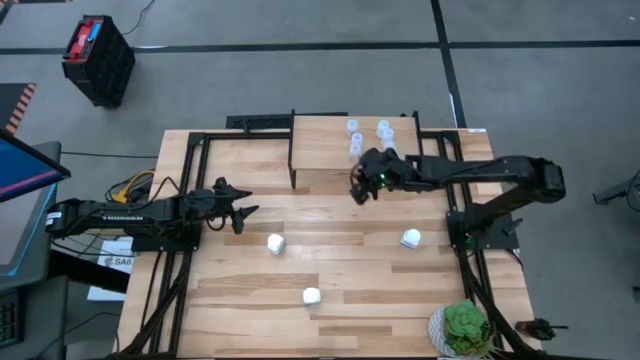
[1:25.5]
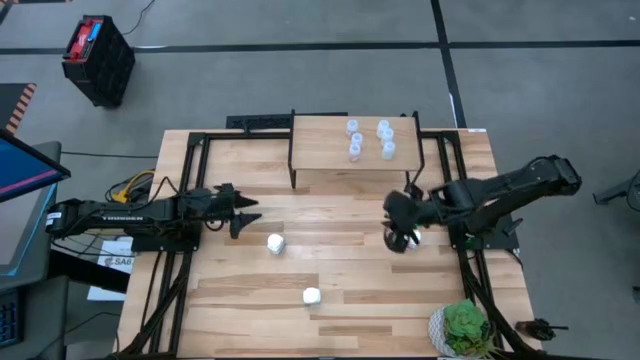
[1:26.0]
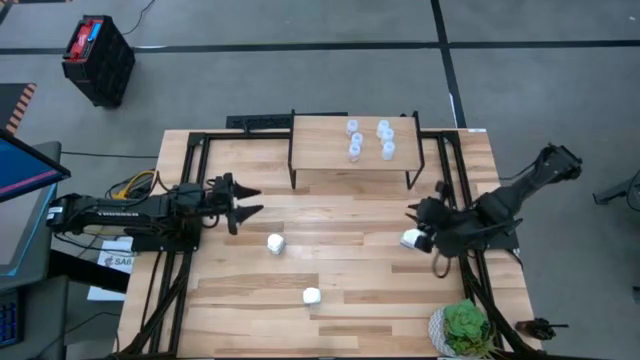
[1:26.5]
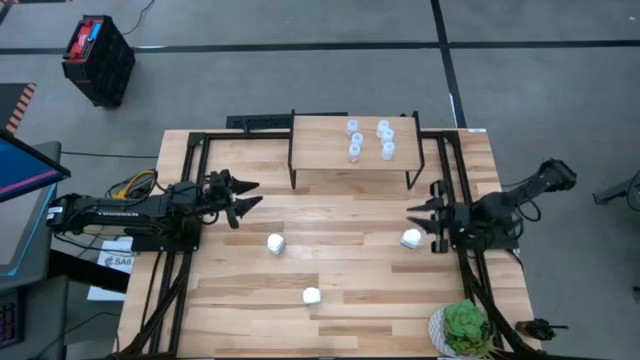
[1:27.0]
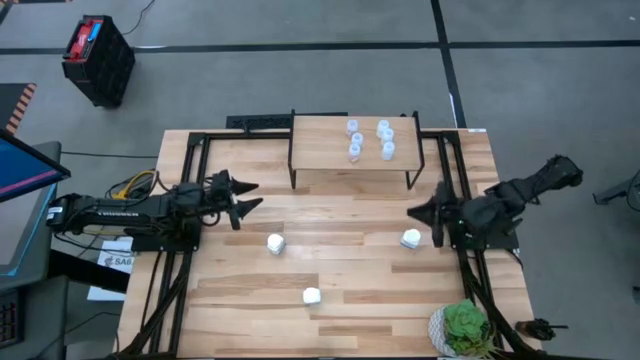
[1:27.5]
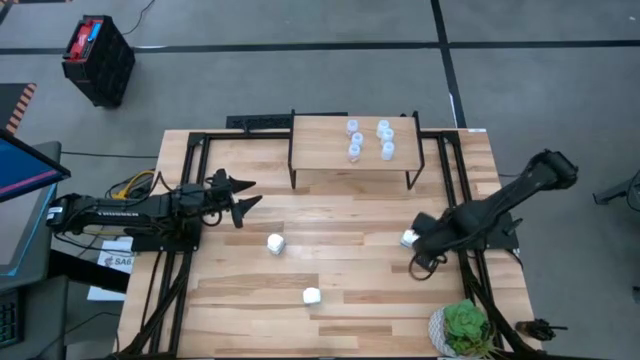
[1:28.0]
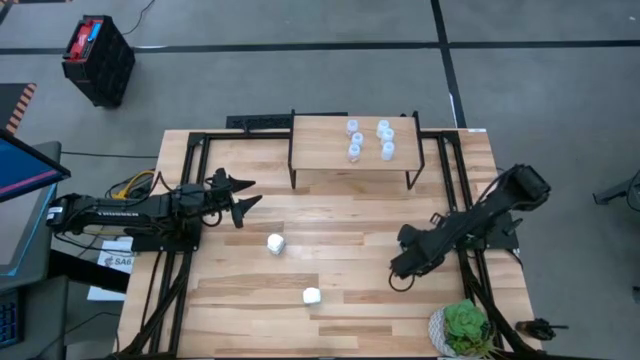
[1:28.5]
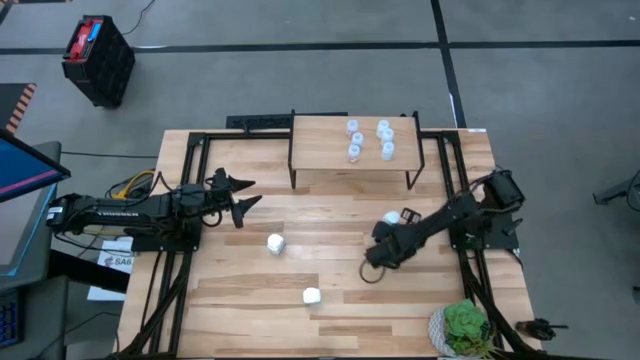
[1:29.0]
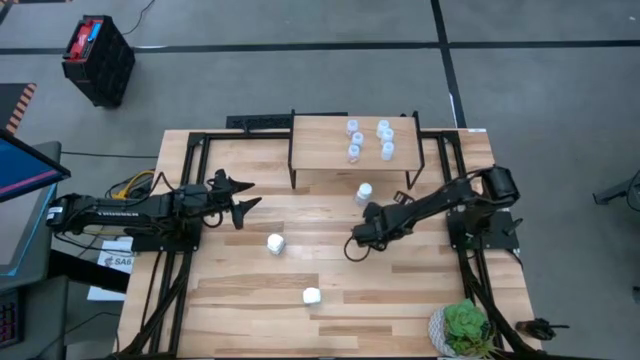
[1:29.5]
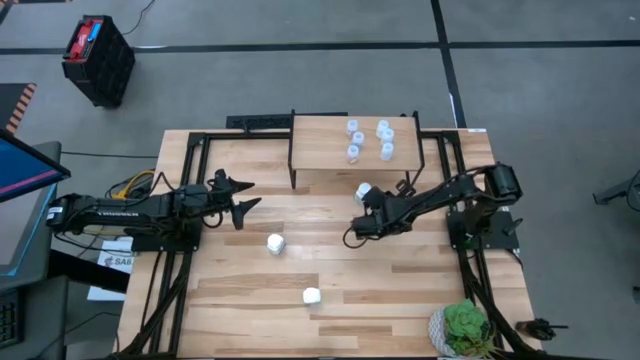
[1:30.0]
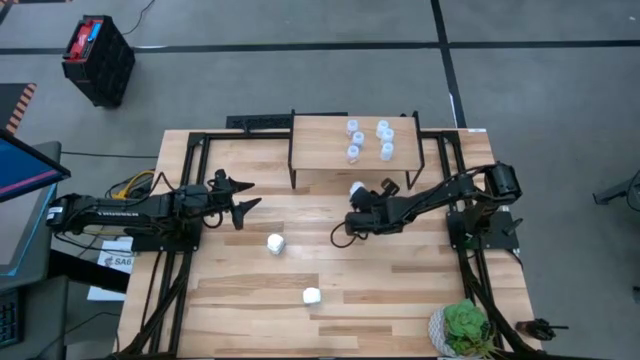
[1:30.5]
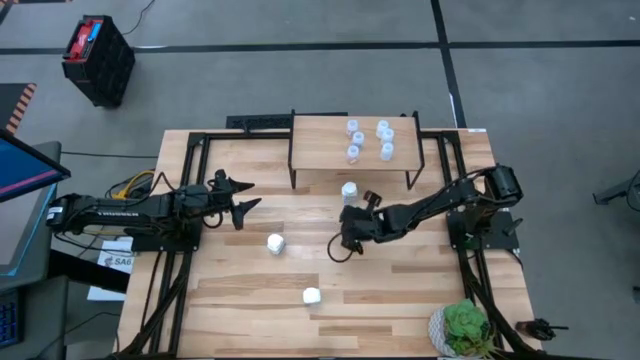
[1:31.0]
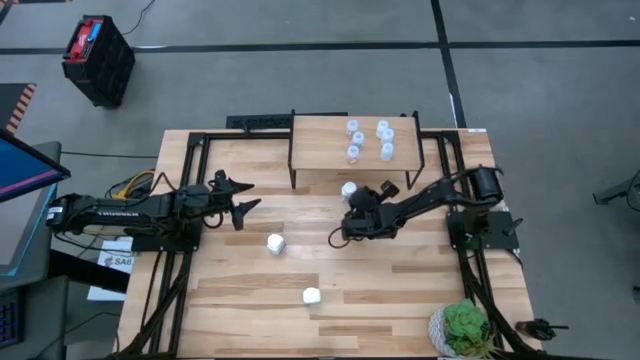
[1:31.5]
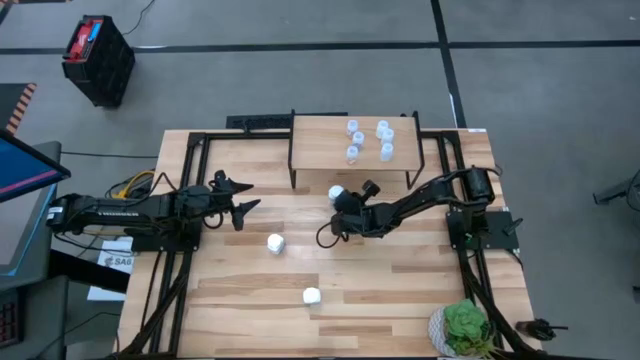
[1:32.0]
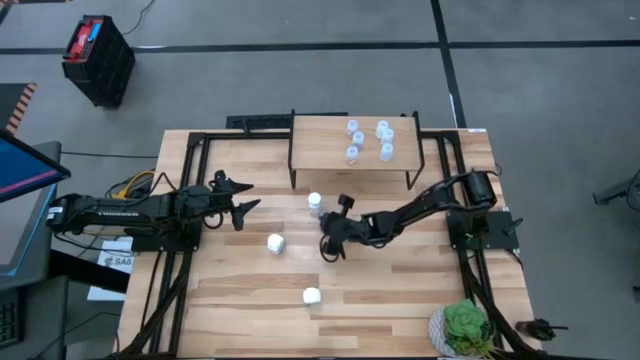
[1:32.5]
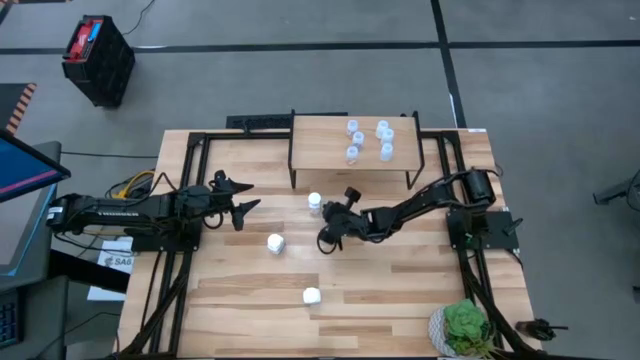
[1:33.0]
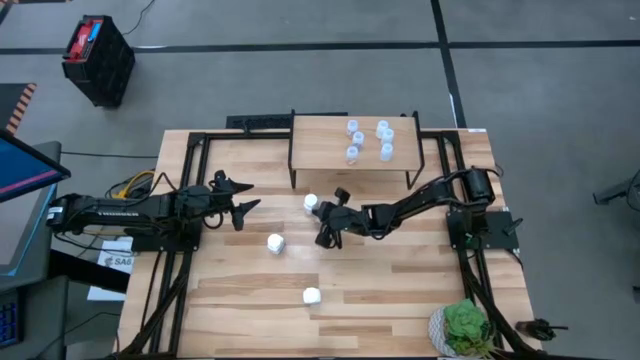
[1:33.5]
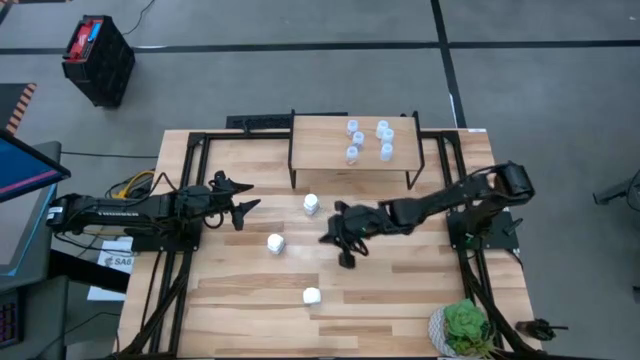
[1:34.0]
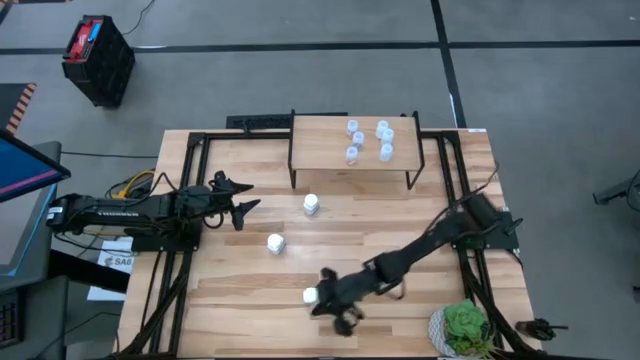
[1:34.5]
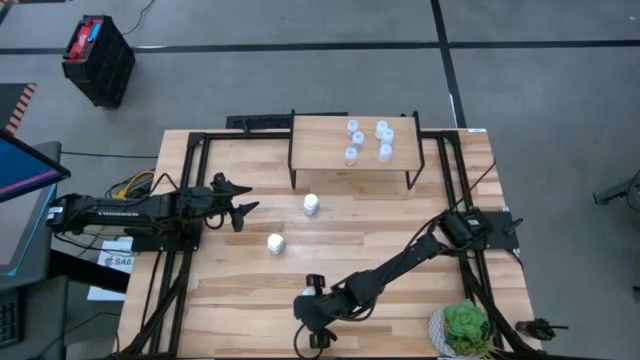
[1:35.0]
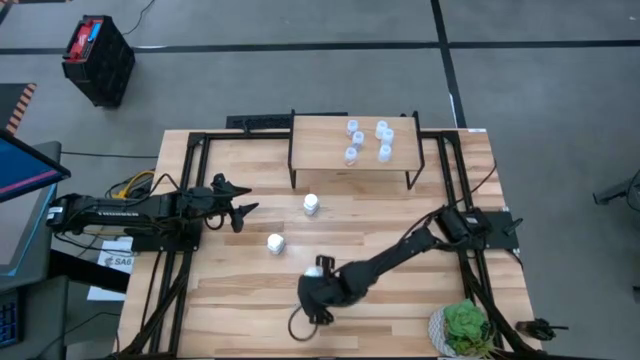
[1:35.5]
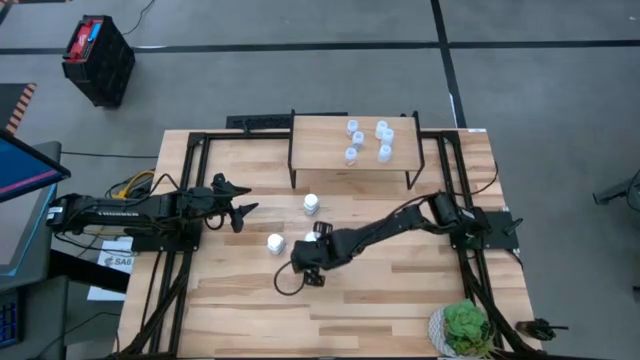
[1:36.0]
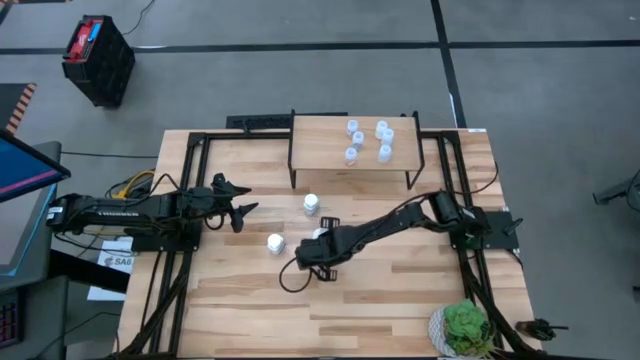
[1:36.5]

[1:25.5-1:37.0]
Task: Pick and place medicine bottles onto shelf by color
Adjust the white blue pill bottles on the table

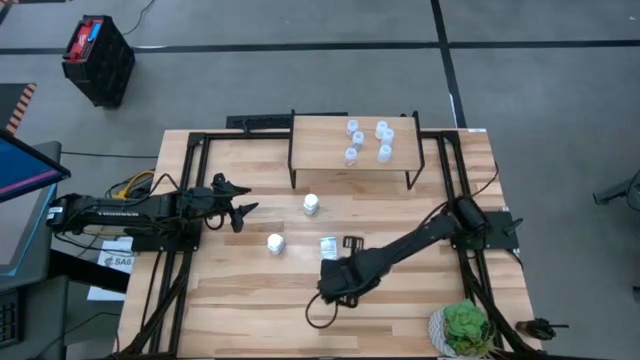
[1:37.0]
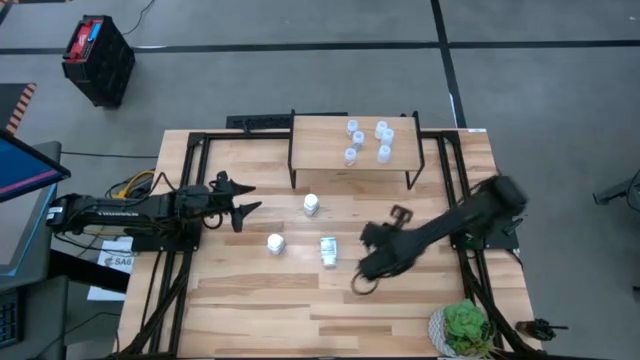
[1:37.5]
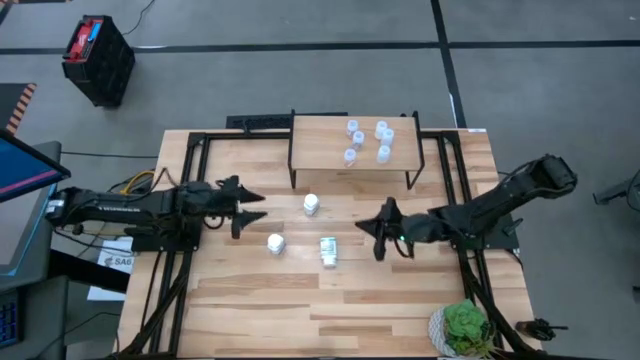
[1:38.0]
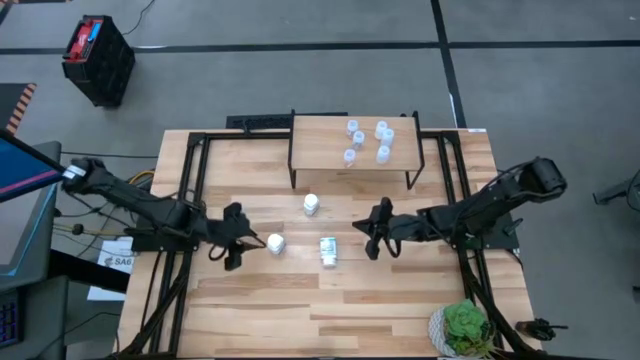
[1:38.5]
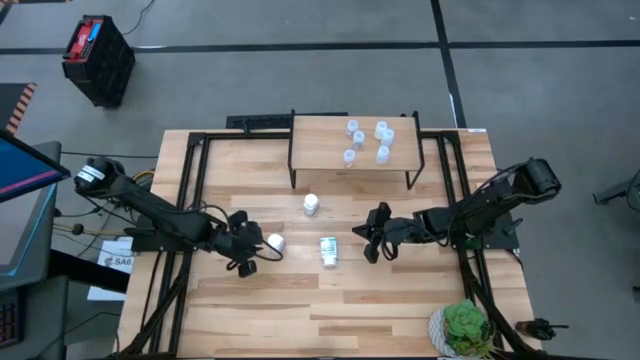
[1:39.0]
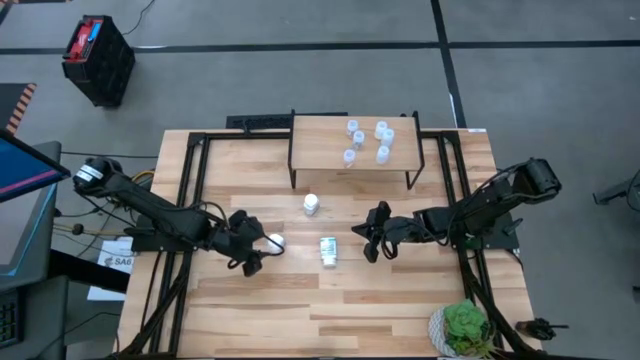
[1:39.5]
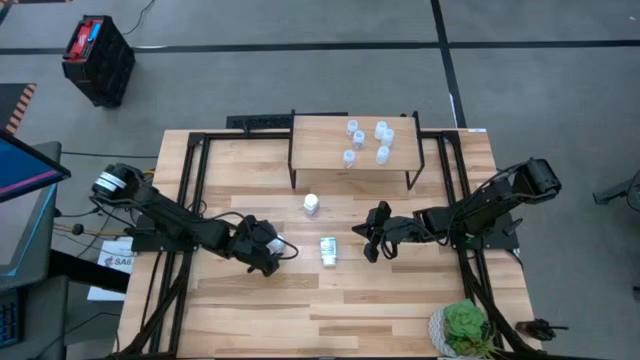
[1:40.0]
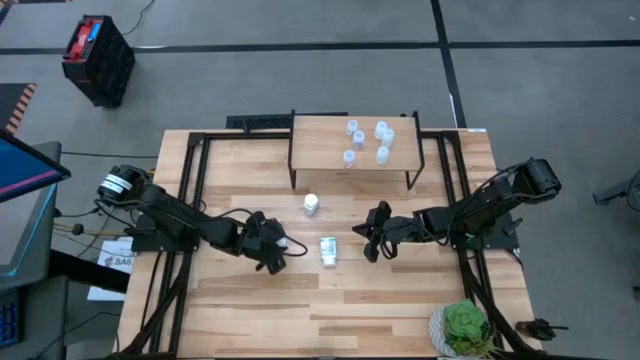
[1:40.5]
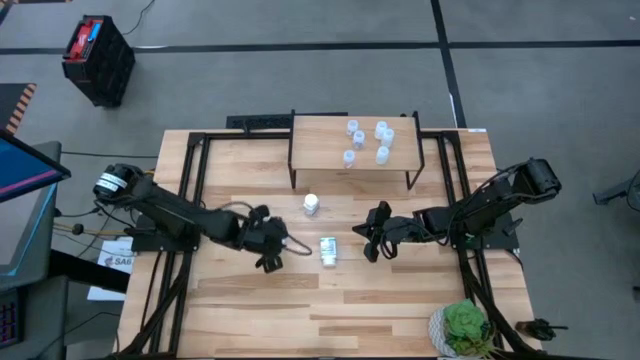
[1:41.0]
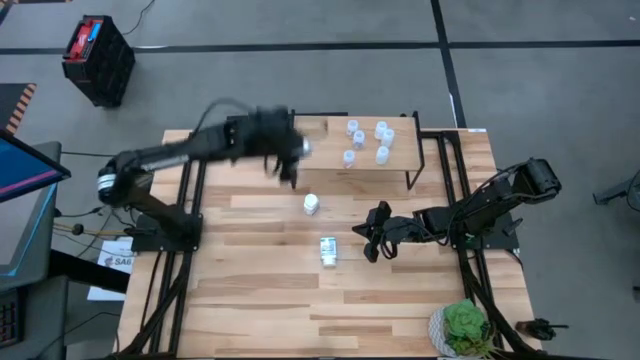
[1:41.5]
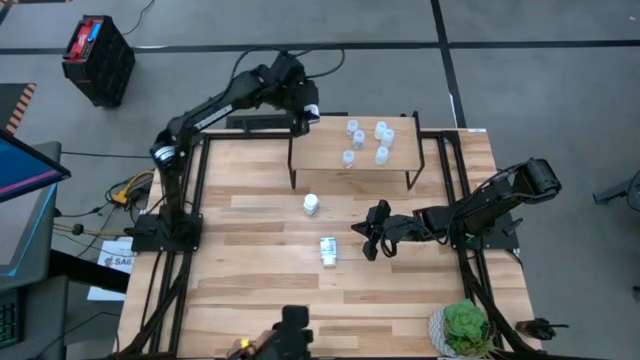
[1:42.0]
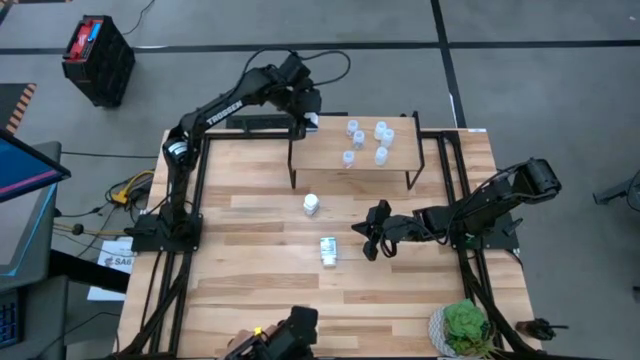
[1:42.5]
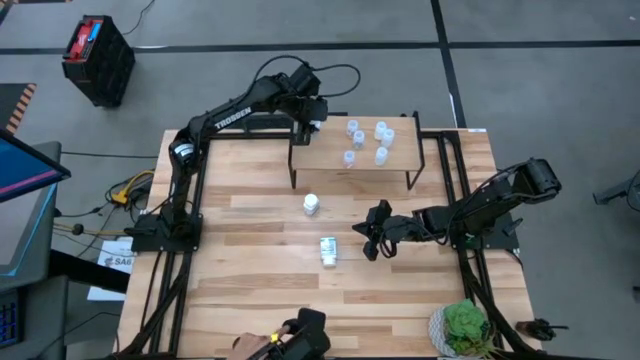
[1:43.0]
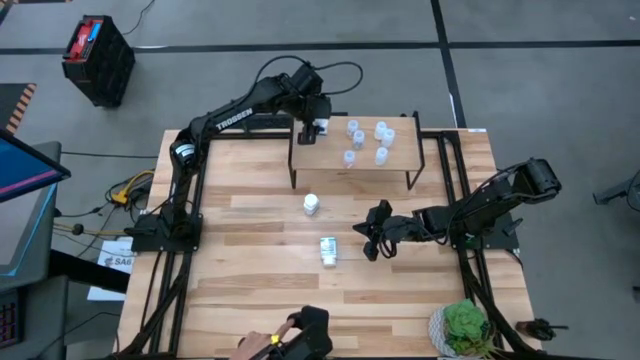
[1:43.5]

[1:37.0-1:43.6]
Put the left white blue pill bottle on the shelf

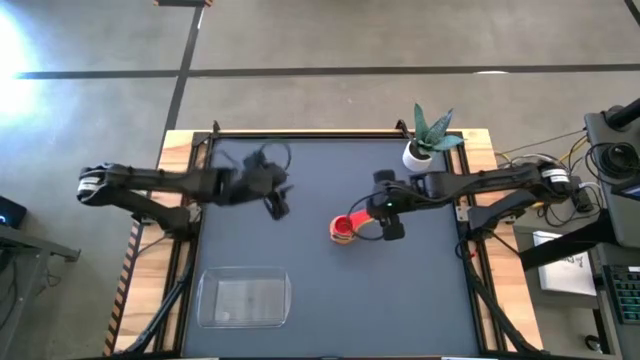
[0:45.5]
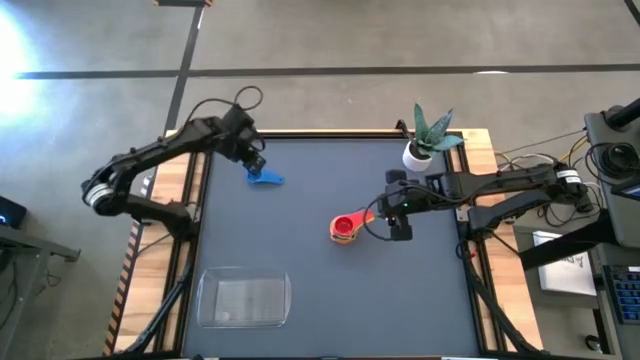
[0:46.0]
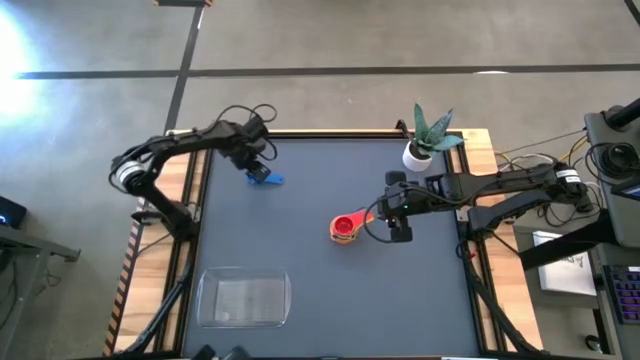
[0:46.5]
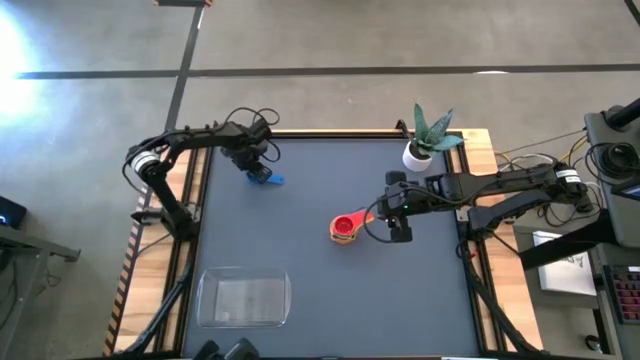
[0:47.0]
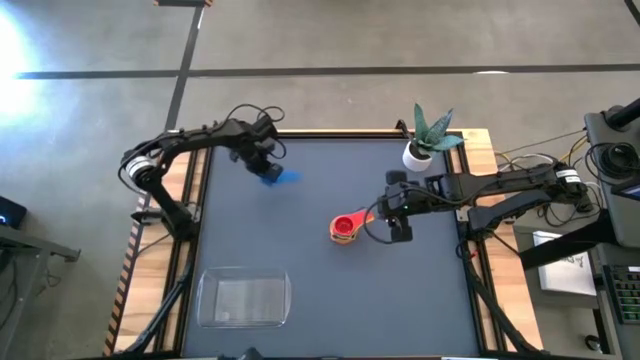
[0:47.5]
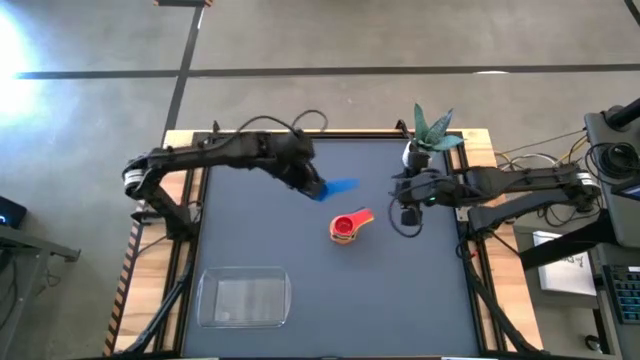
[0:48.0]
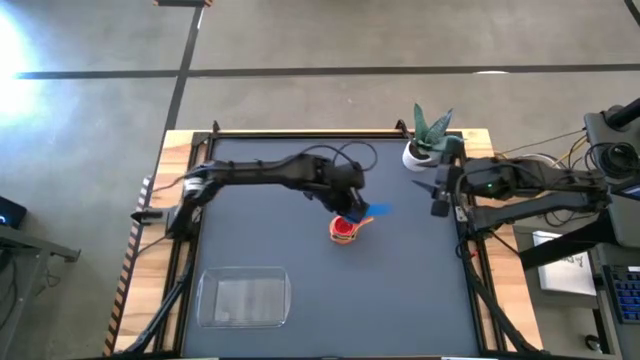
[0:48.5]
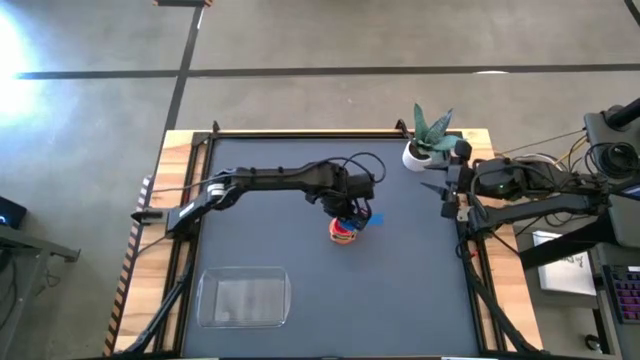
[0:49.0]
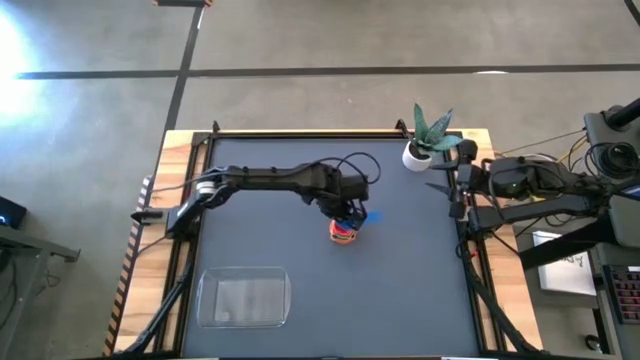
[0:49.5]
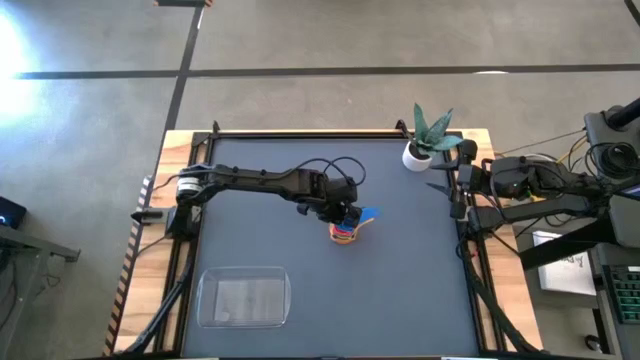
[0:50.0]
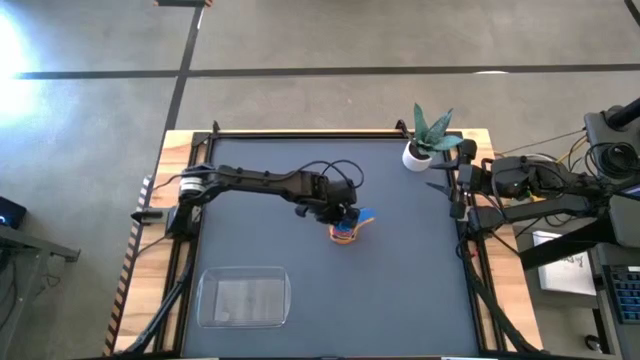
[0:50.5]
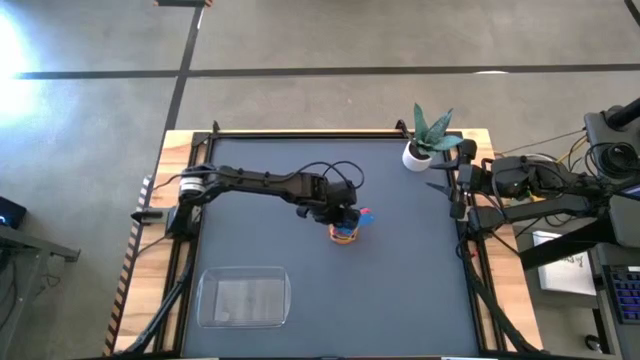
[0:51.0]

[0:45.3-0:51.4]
Task: Nest measuring cups in basket
Stack the blue measuring cup on top of the red measuring cup
